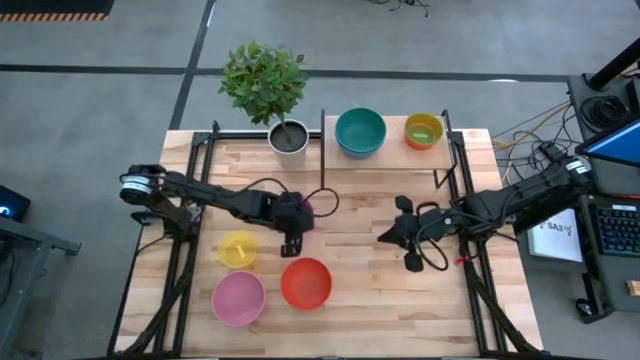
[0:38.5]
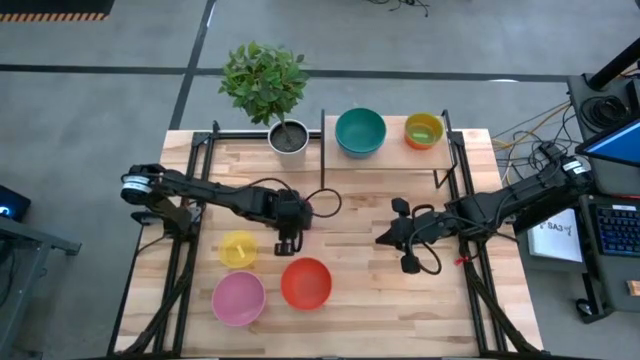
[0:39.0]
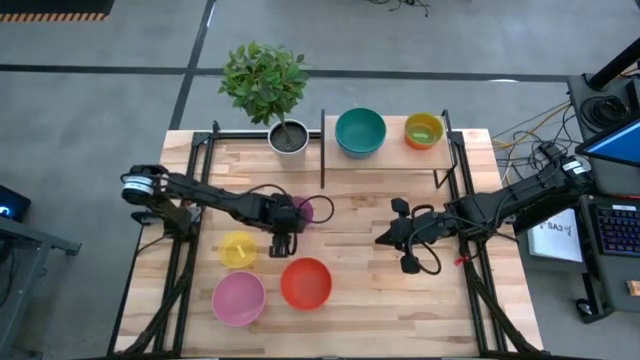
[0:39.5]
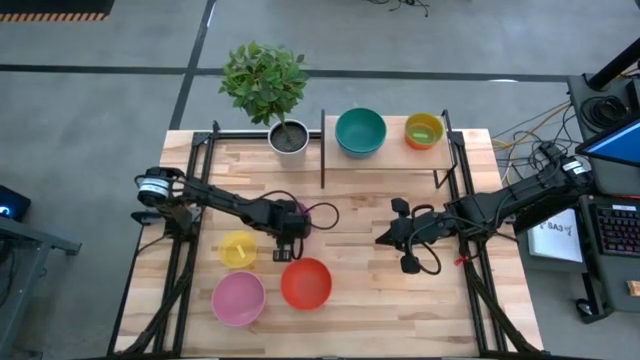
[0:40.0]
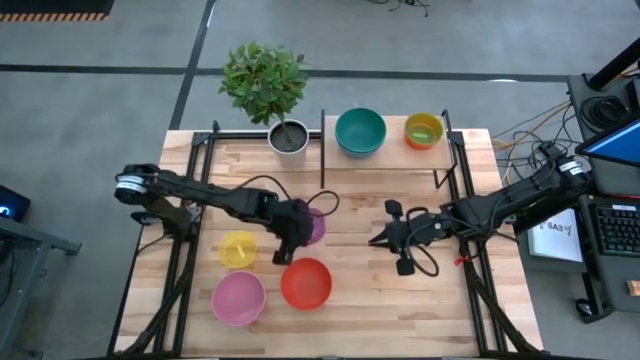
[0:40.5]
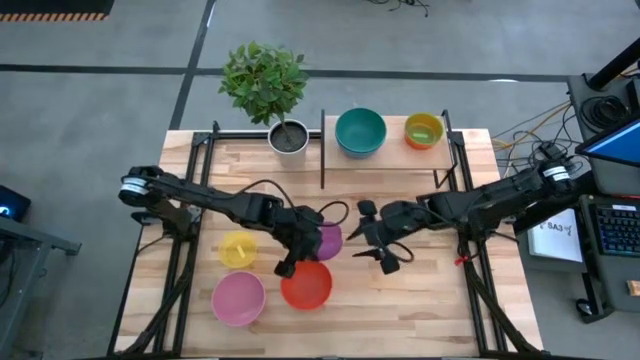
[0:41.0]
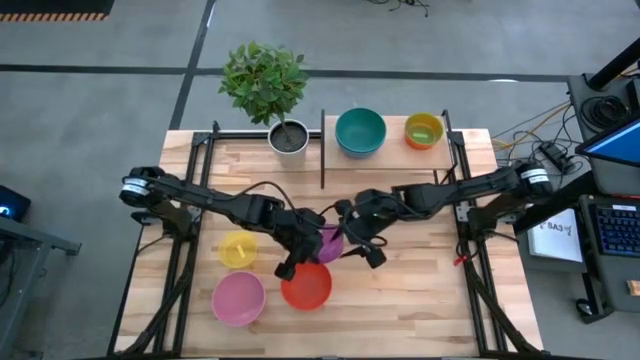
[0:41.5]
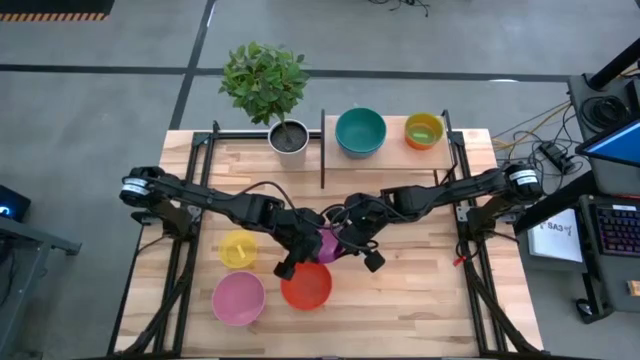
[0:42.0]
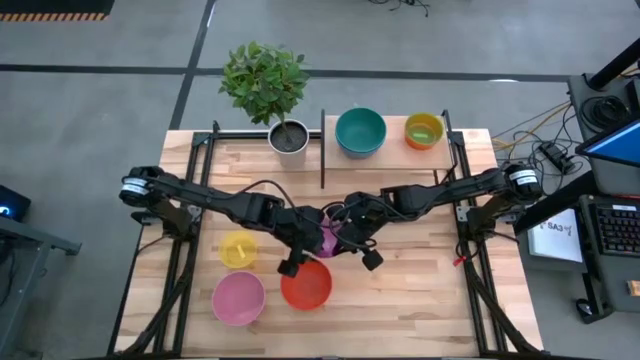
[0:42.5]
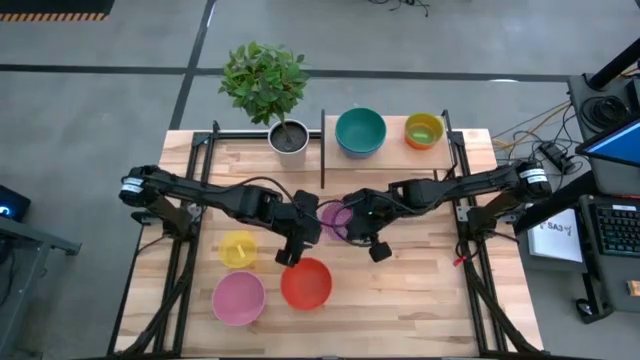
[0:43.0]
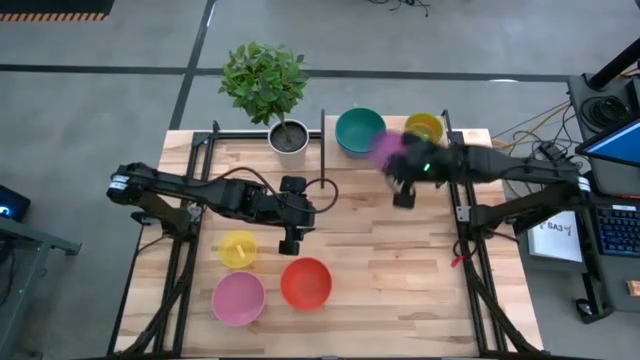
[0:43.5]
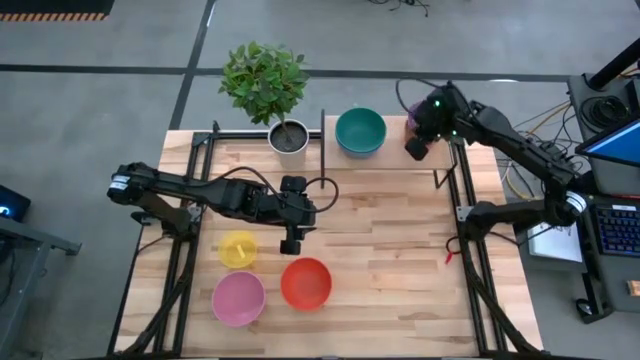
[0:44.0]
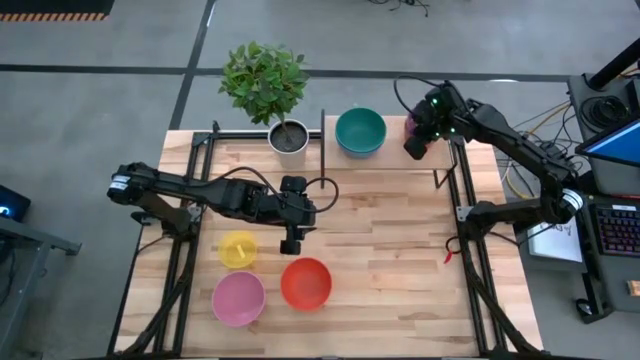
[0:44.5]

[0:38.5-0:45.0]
Task: Place and stack bowls onto a shelf
Stack the purple bowl on top of the green bowl on the shelf

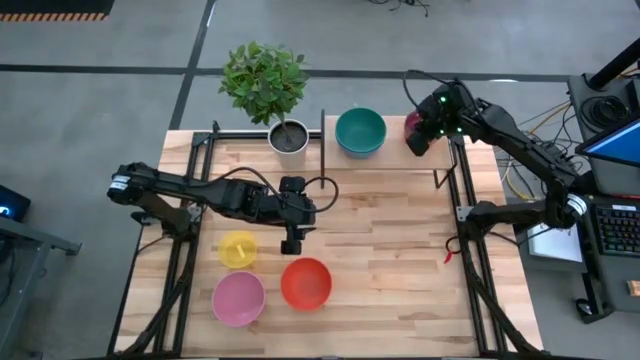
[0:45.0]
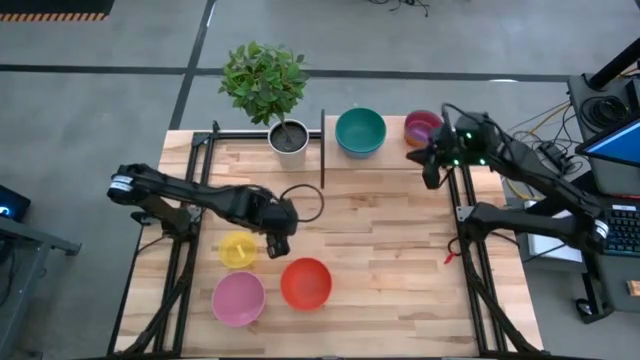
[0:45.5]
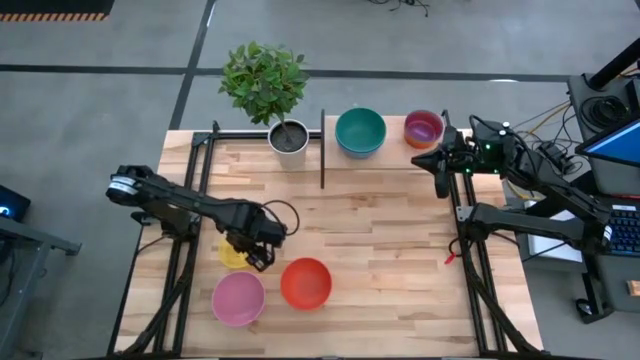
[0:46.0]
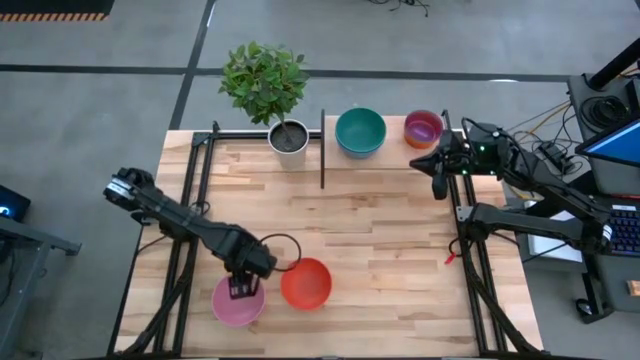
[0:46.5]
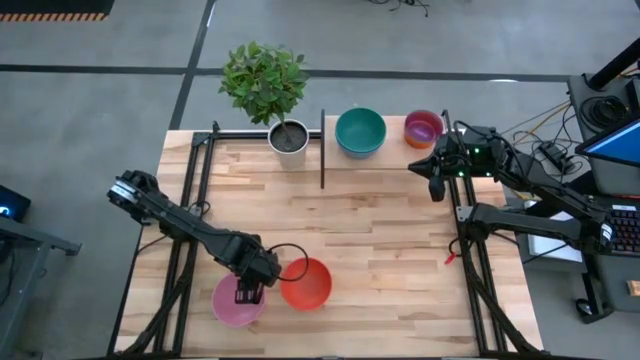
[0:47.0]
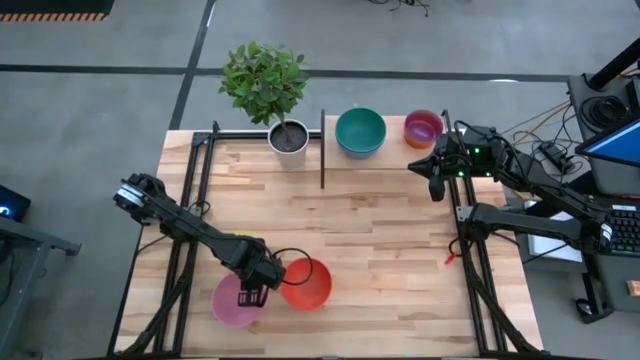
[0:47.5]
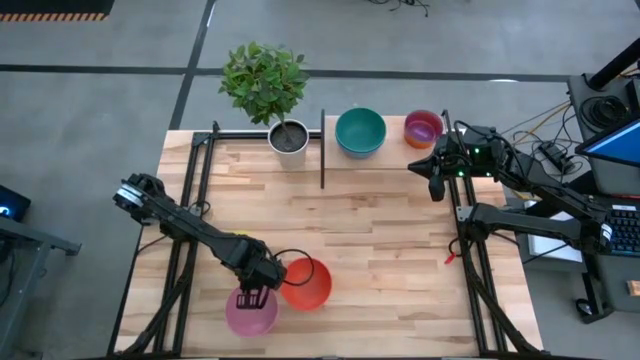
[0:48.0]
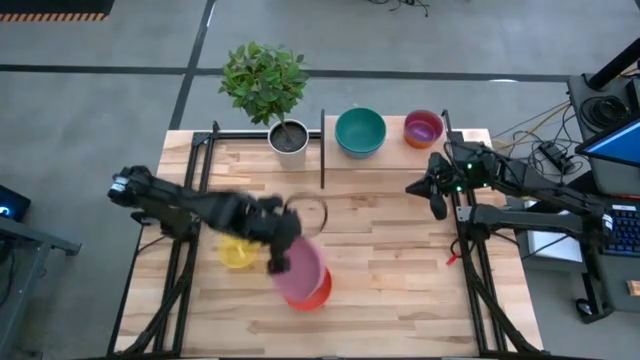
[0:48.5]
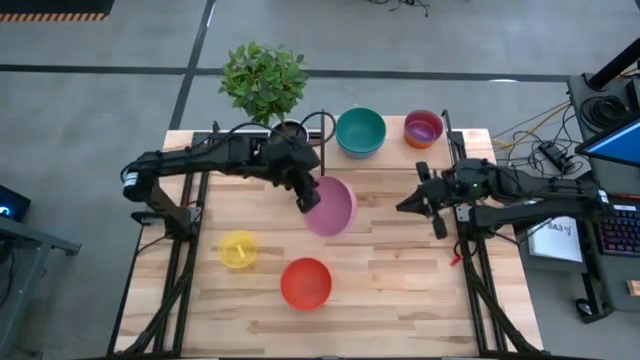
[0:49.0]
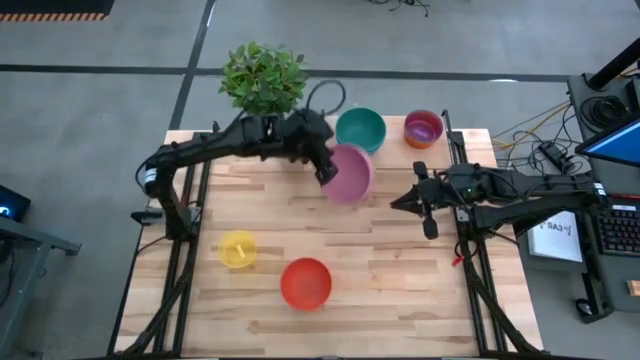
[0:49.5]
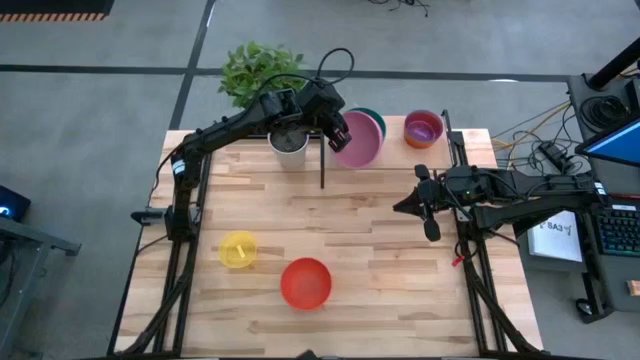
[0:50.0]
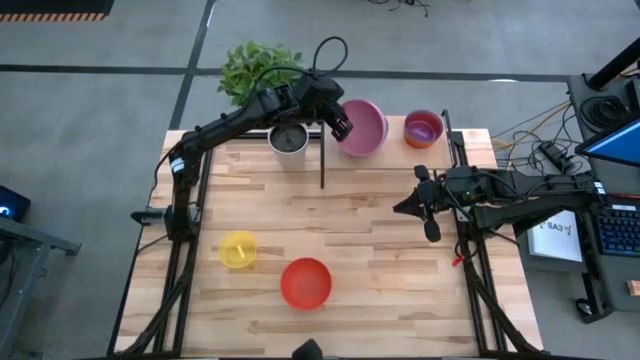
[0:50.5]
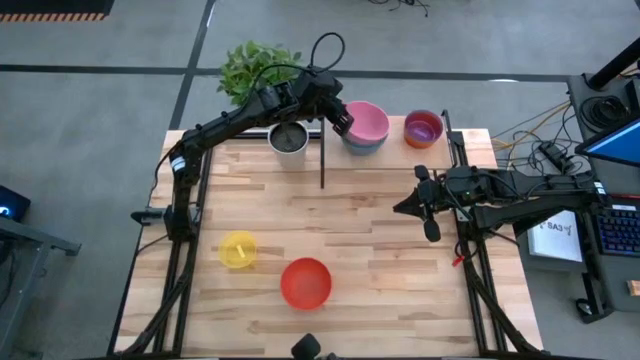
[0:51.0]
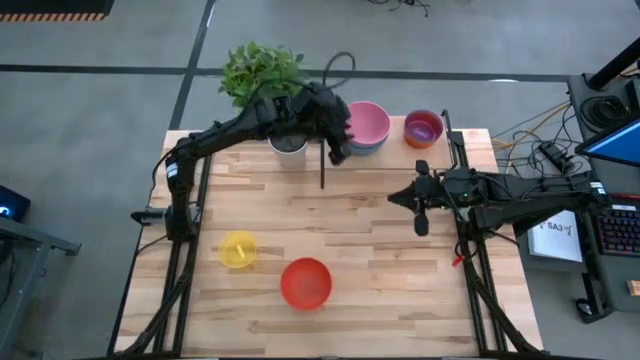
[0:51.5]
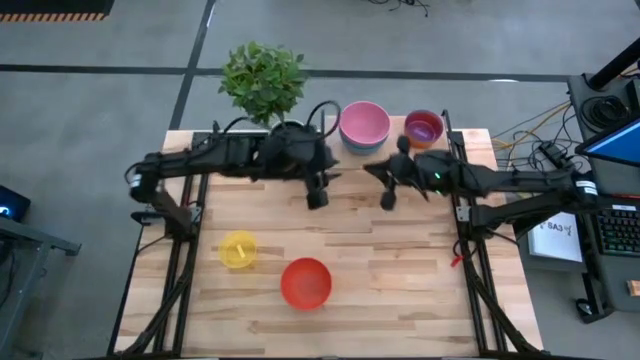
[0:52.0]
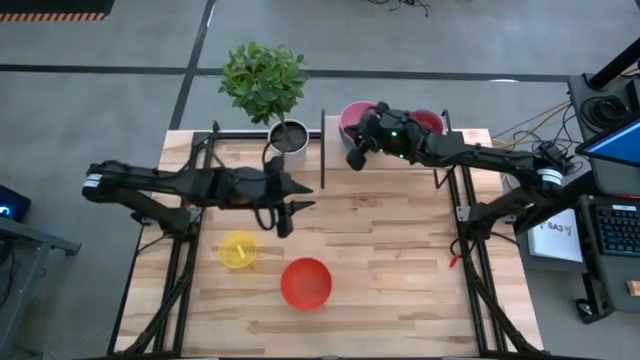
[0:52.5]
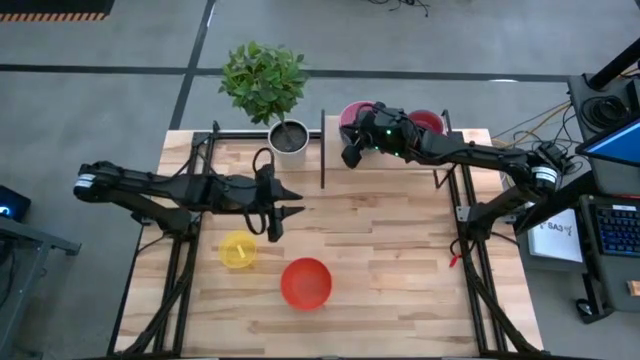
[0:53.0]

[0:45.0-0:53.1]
Stack the pink bowl on top of the green bowl on the shelf

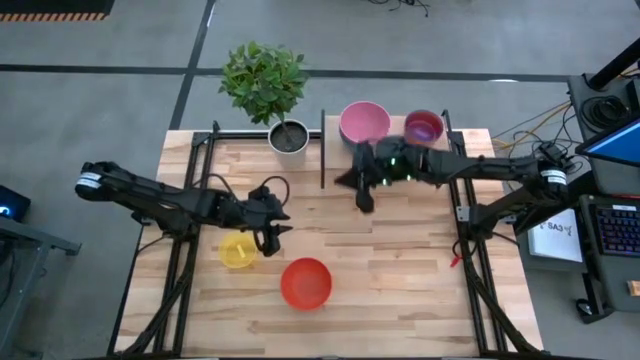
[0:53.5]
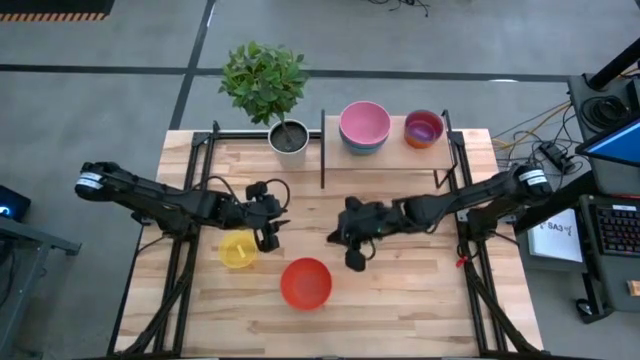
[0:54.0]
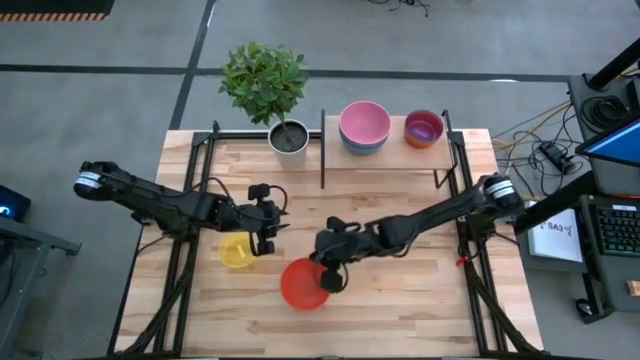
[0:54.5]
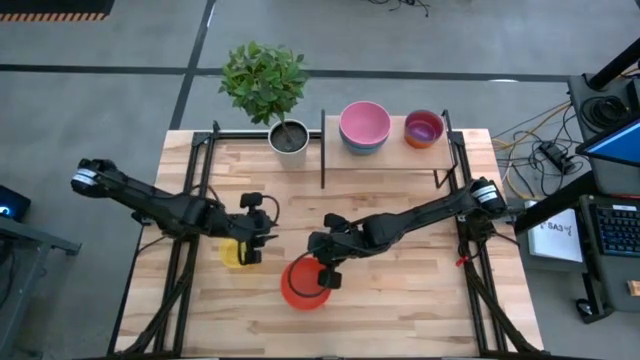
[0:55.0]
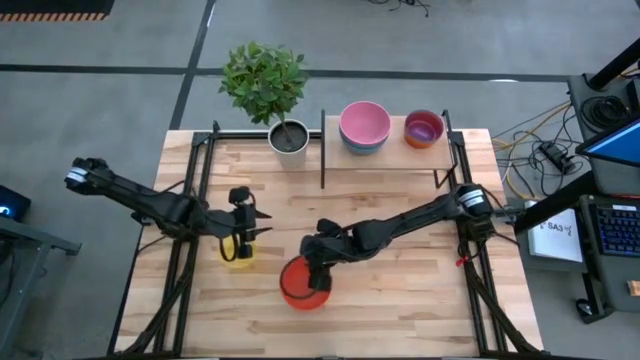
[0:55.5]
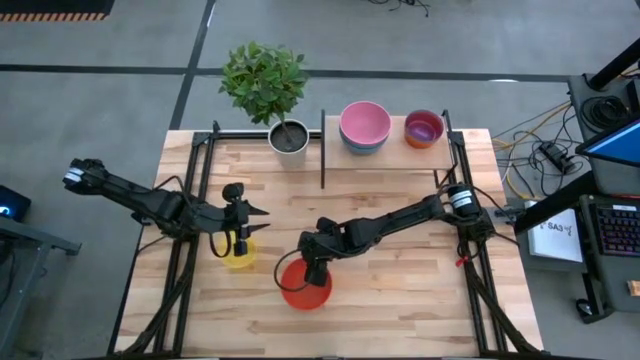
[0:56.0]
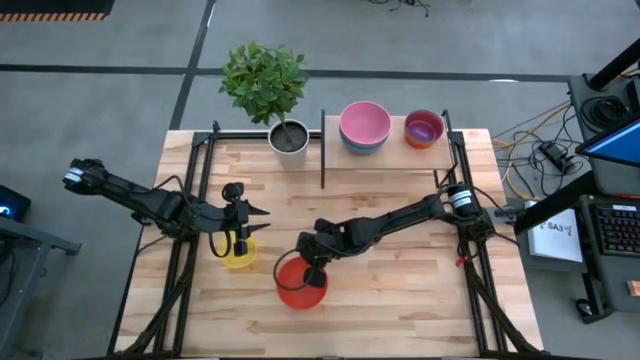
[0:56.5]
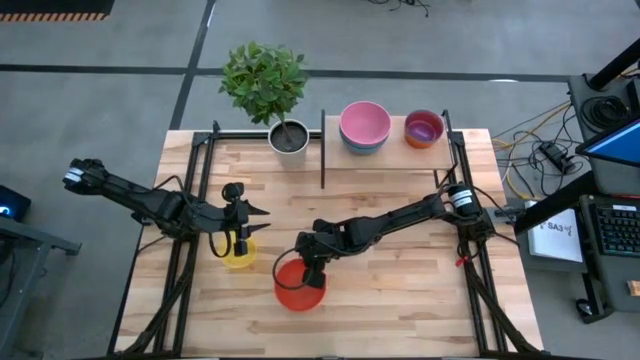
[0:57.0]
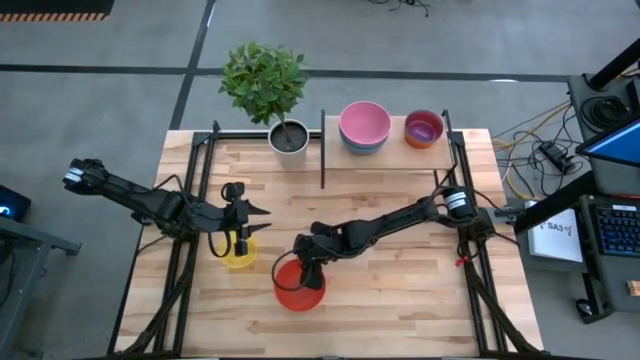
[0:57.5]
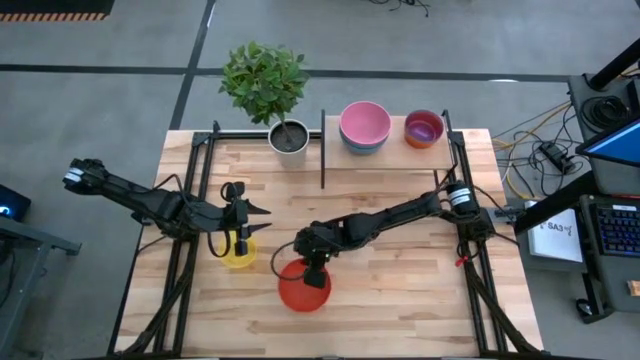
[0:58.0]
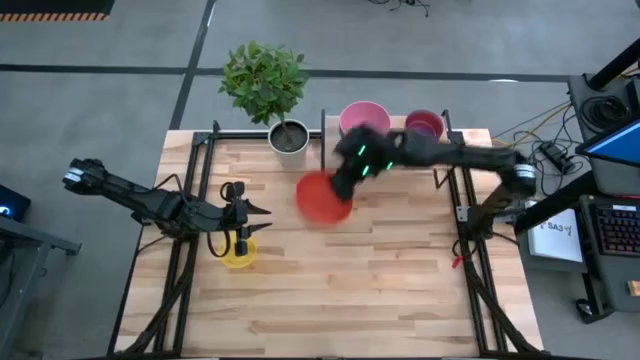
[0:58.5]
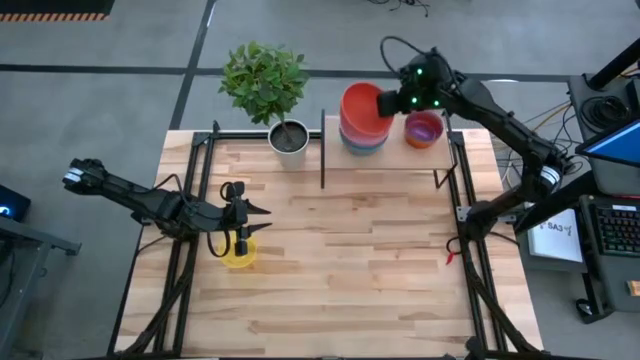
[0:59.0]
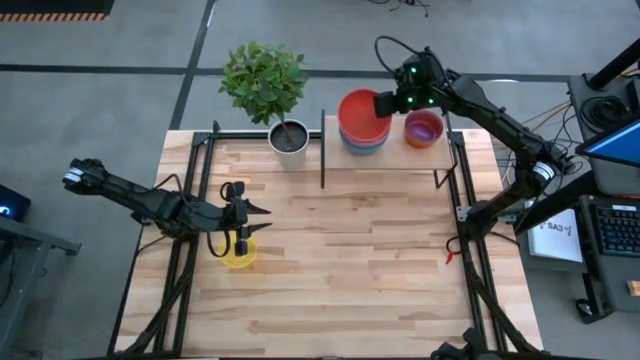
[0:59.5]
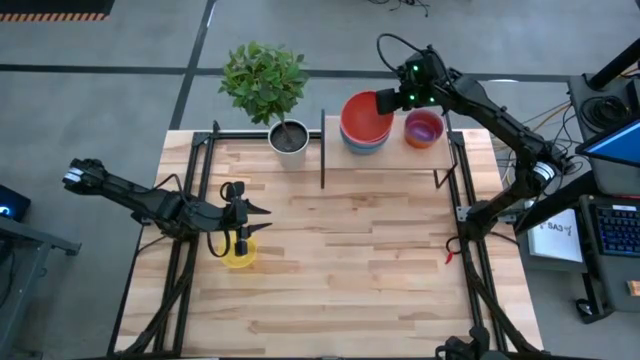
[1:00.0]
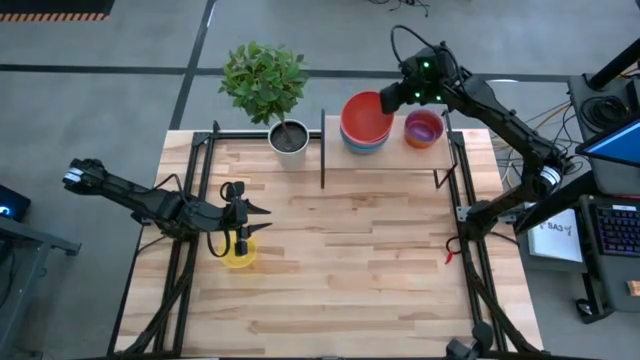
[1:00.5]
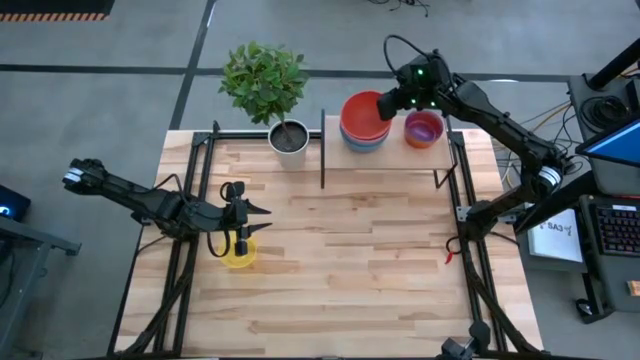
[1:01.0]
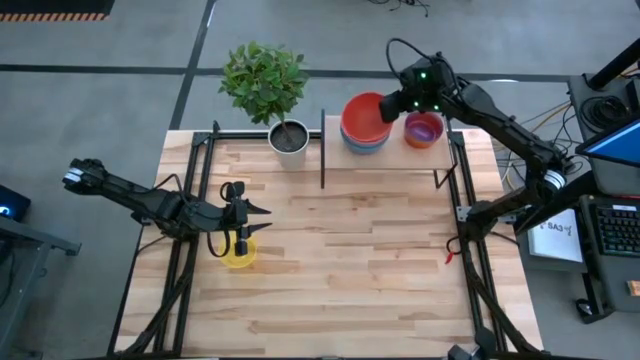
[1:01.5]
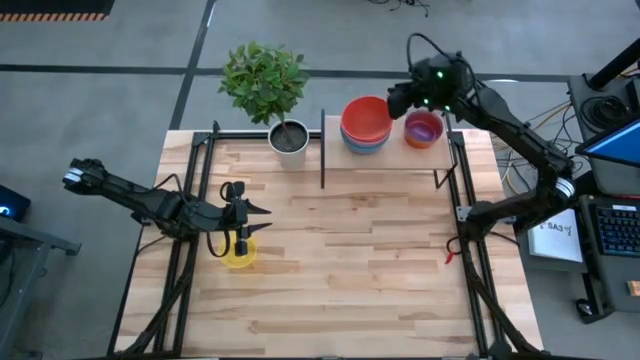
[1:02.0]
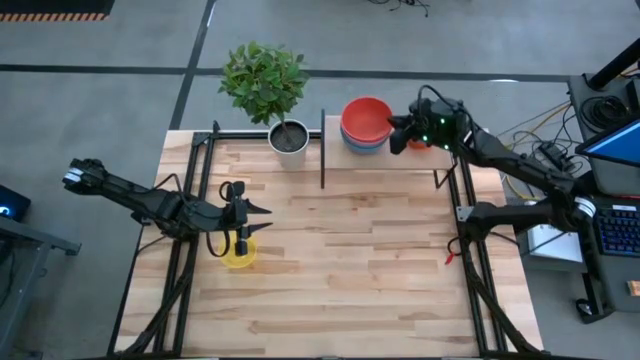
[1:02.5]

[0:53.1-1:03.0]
Stack the orange bowl on top of the pink bowl on the shelf
